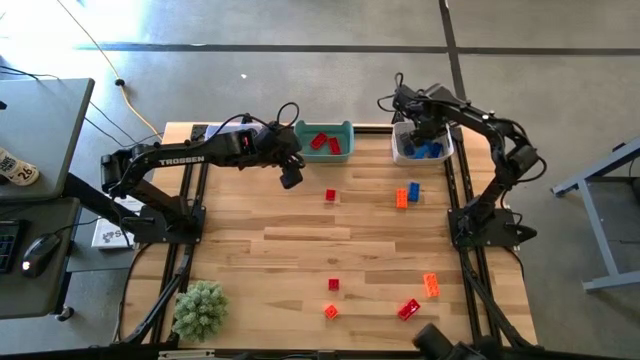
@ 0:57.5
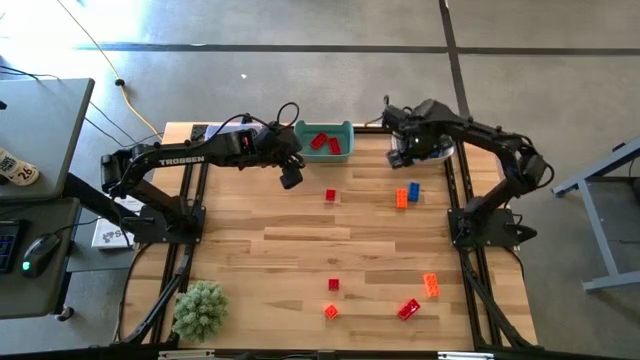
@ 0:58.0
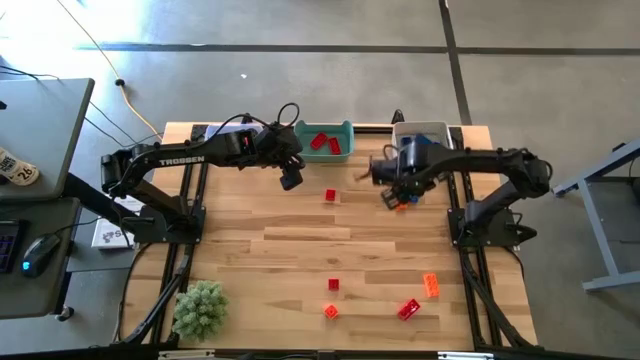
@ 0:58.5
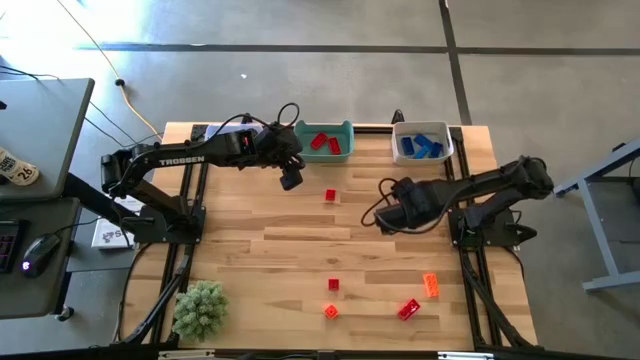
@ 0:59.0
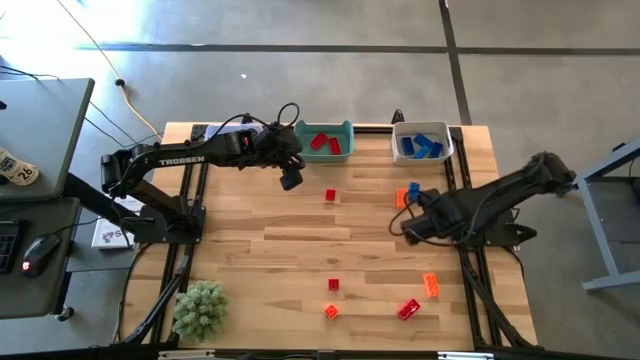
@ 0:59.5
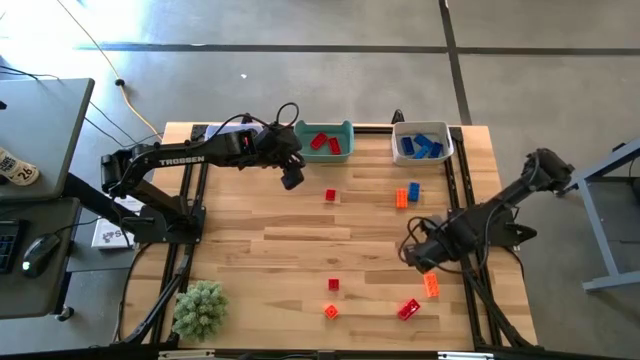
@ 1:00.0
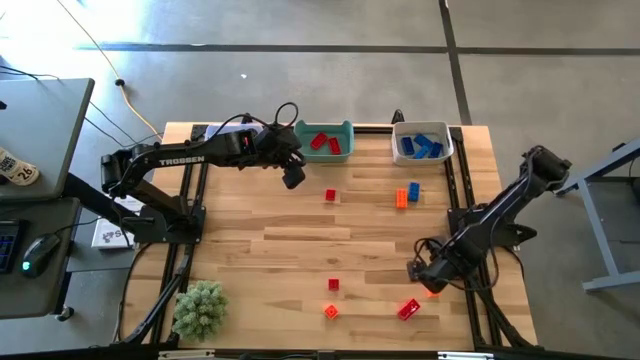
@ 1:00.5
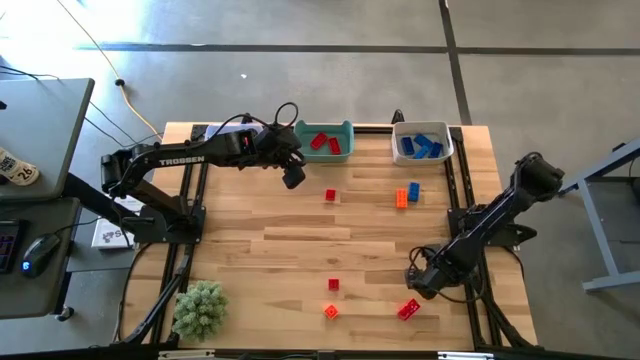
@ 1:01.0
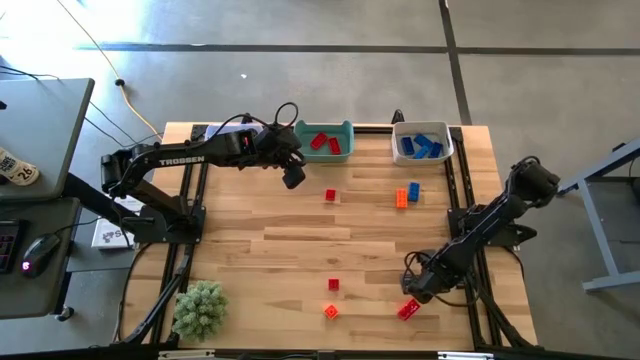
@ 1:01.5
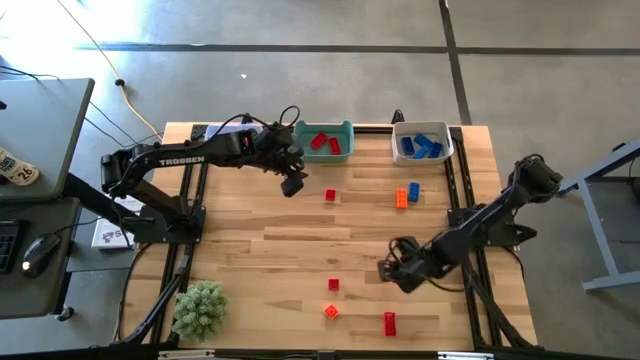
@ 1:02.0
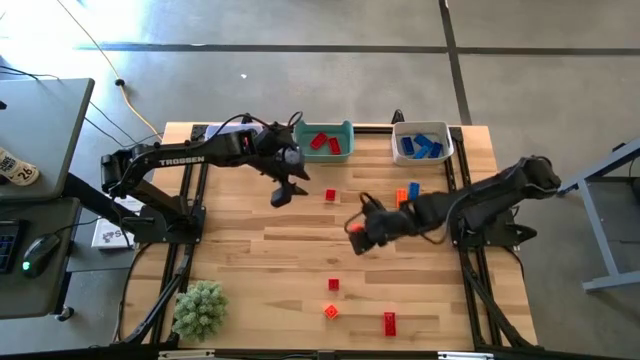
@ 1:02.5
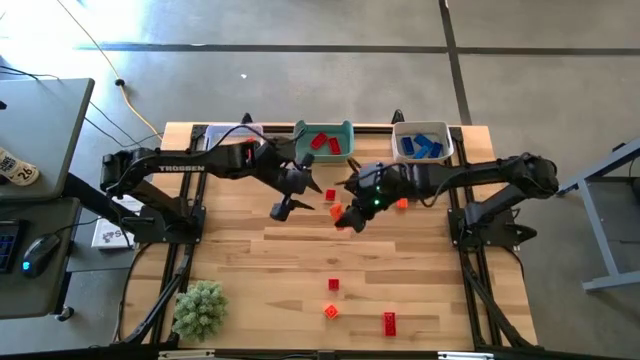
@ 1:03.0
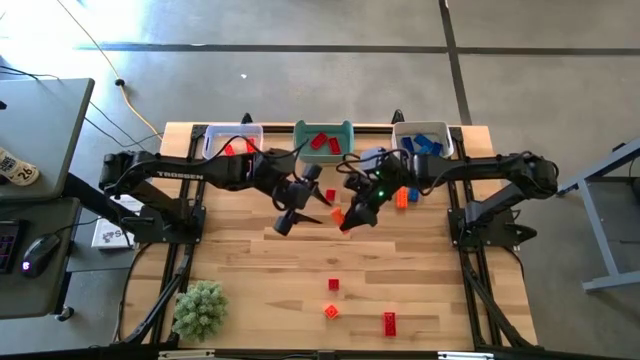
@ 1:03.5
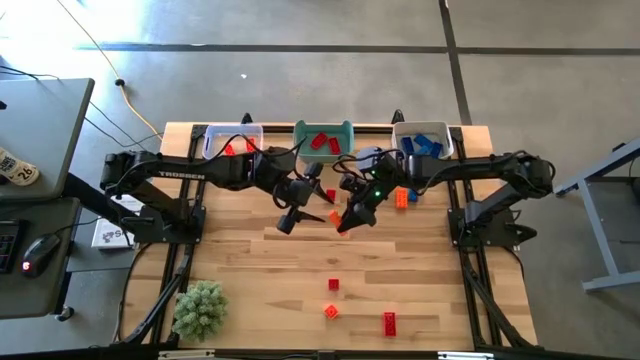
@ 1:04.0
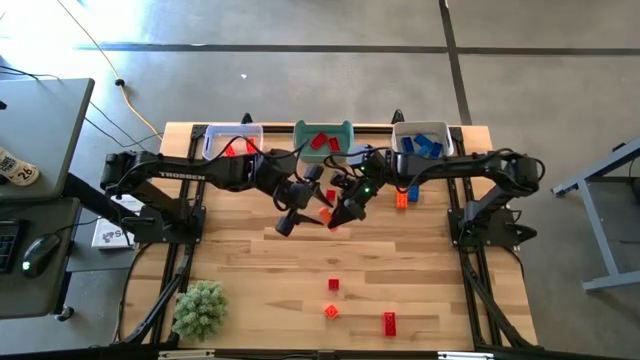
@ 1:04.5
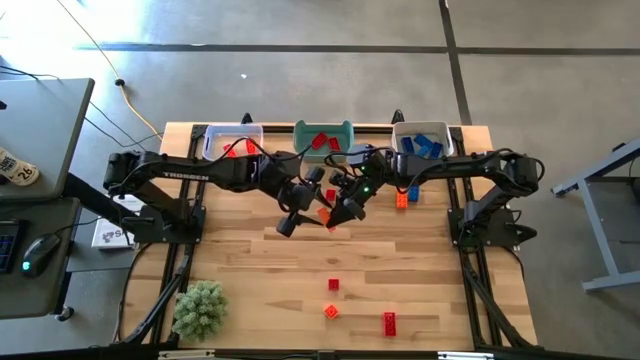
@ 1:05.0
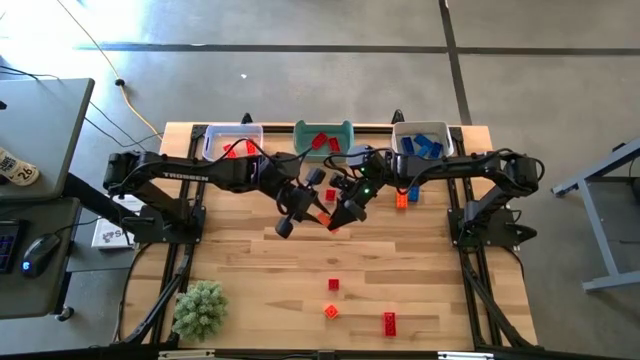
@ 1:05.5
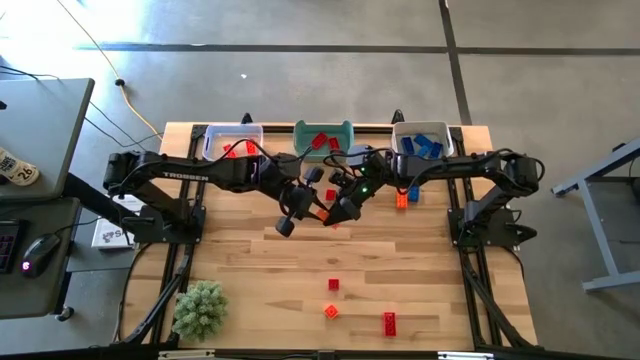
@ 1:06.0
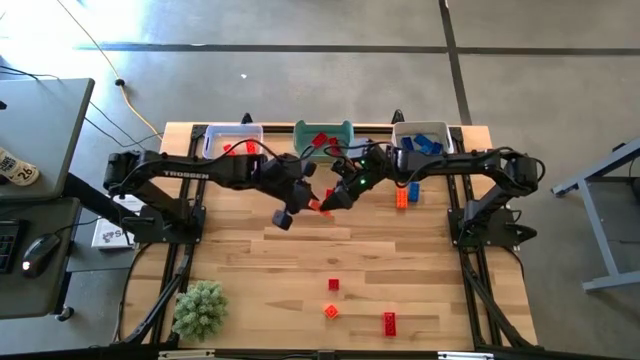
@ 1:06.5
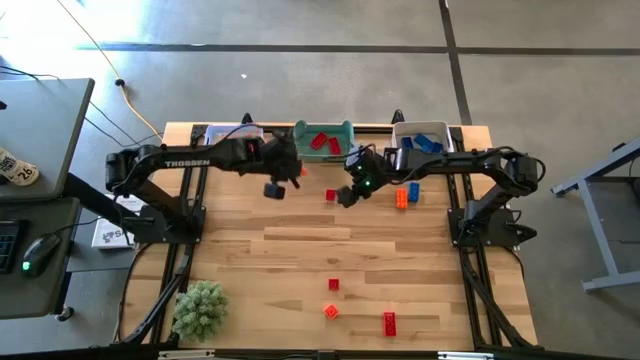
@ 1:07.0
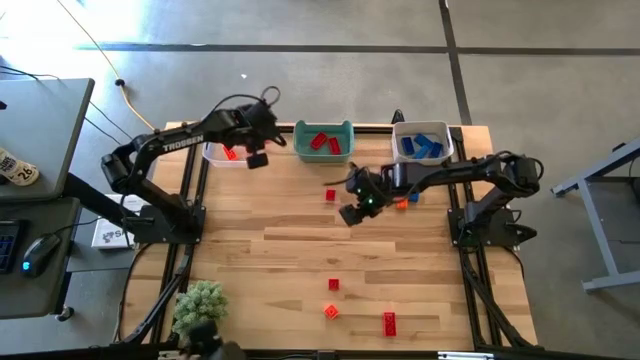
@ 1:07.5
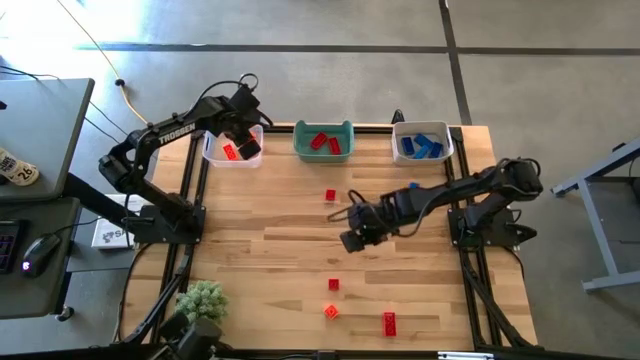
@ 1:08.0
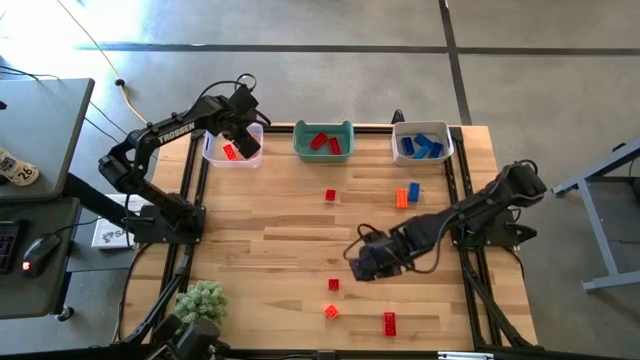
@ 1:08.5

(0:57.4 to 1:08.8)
Task: Sort & place blocks by color
Put the orange game piece into the transparent bin

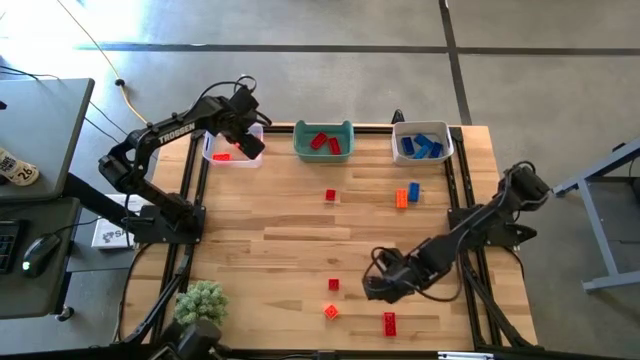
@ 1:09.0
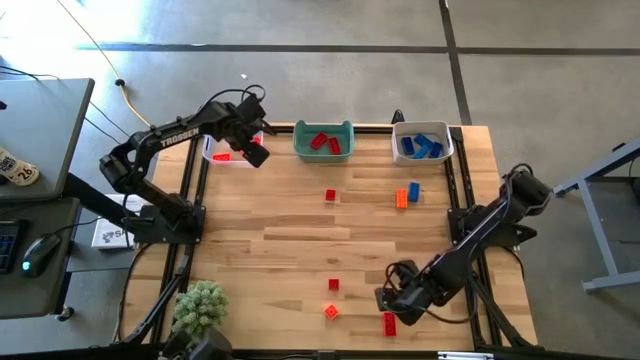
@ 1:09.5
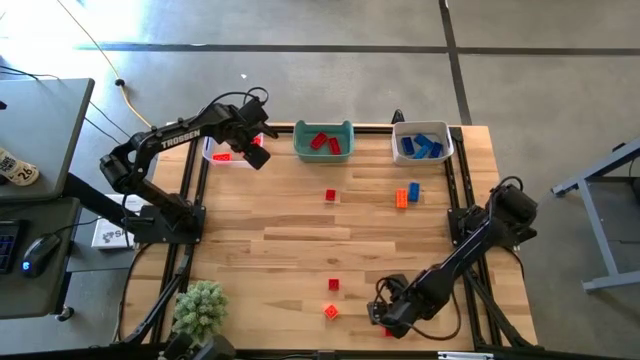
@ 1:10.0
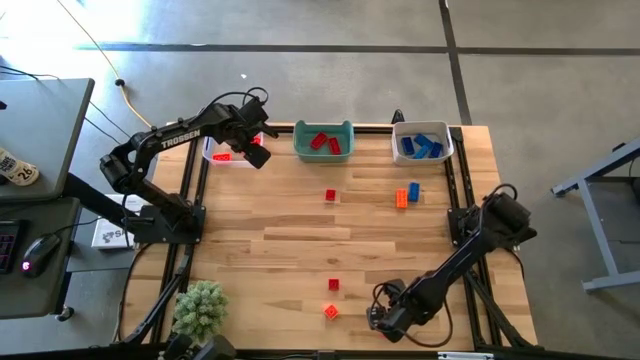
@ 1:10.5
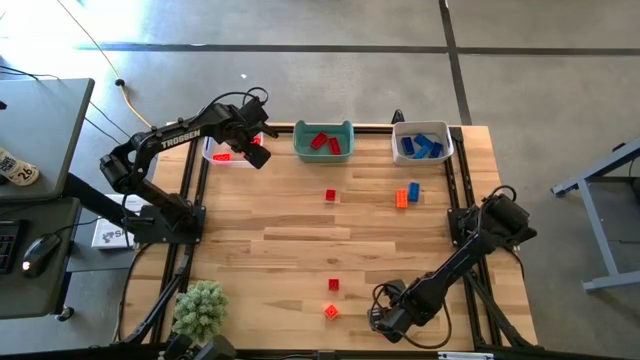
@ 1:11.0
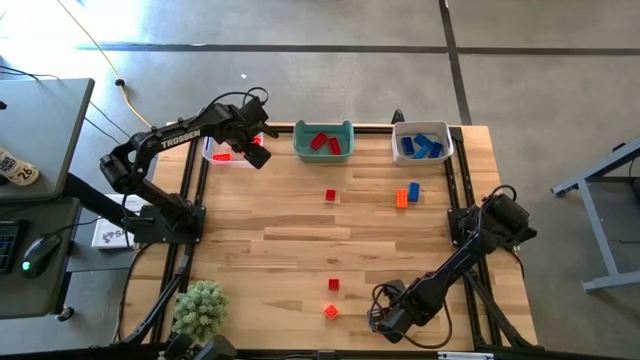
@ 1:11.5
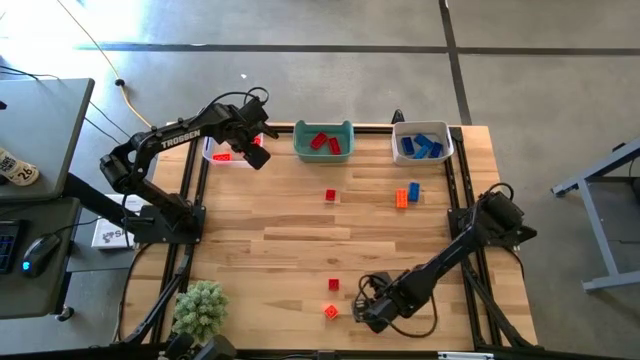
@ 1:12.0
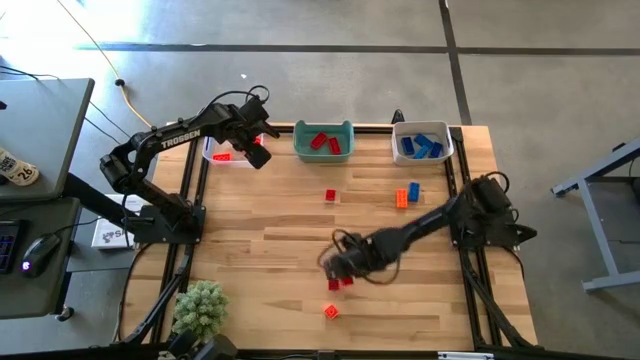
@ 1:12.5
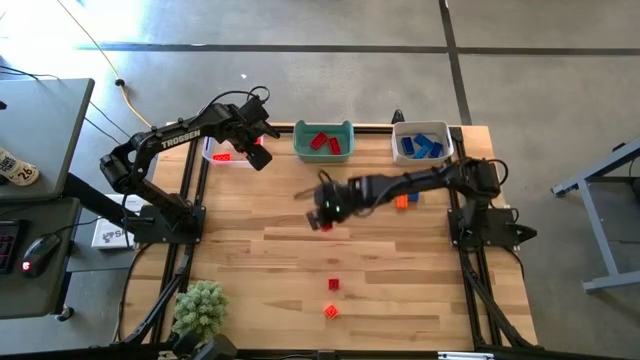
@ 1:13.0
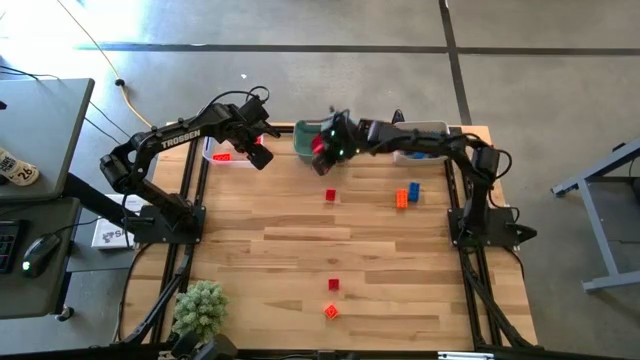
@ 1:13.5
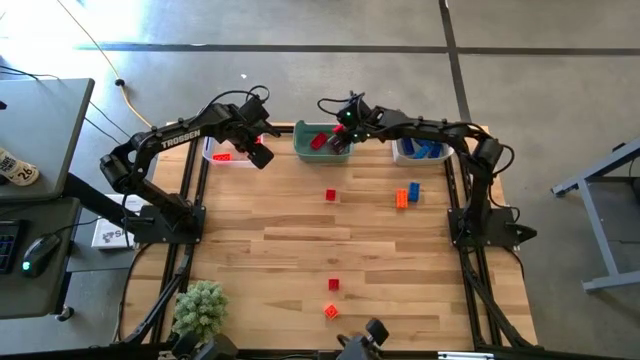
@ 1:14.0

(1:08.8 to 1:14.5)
Put the right red game piece into the green bin

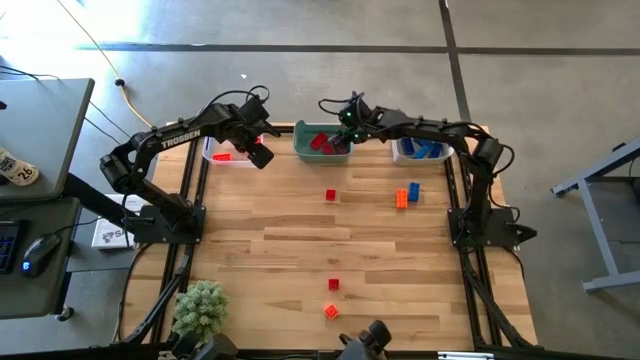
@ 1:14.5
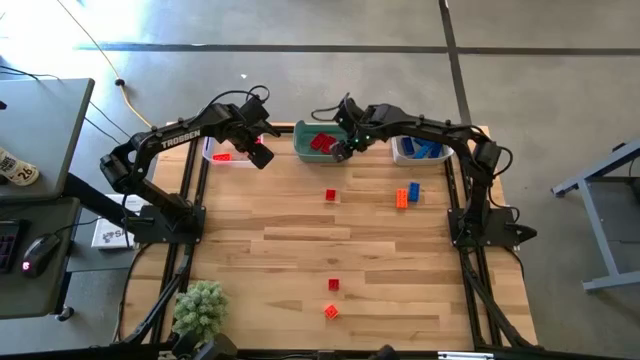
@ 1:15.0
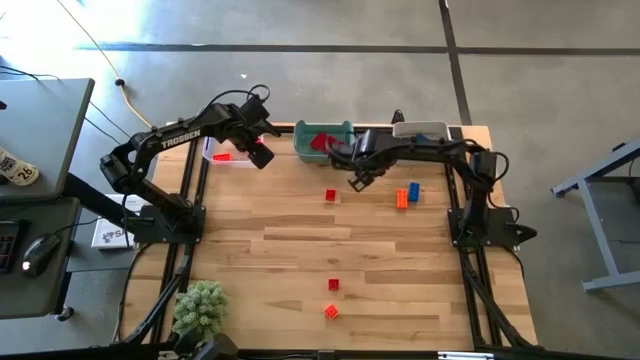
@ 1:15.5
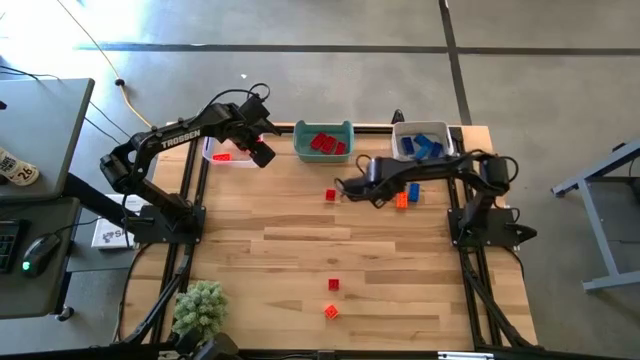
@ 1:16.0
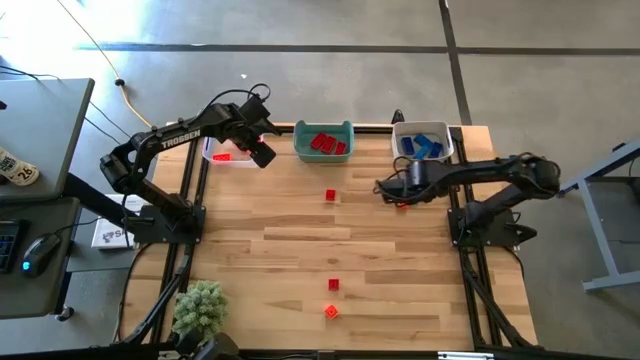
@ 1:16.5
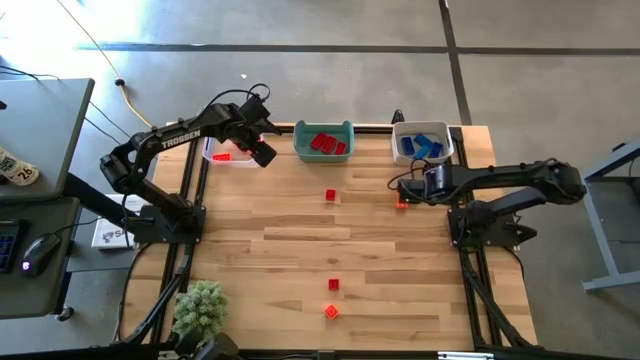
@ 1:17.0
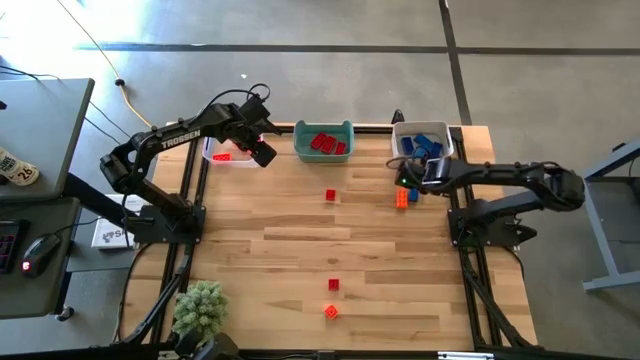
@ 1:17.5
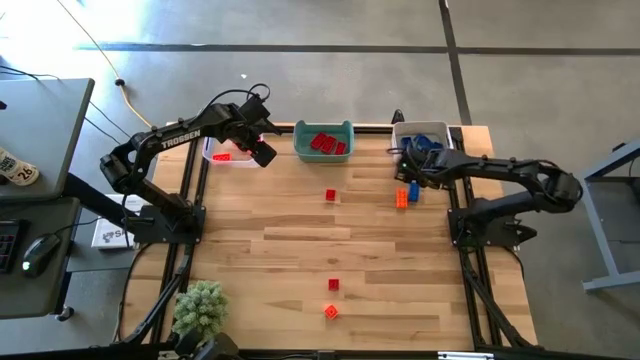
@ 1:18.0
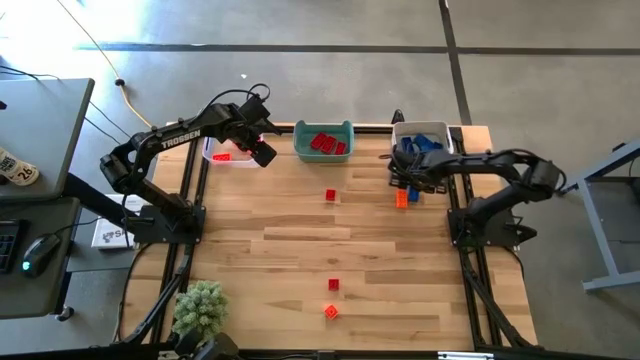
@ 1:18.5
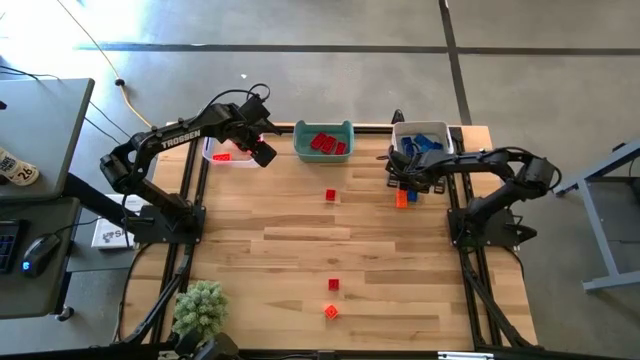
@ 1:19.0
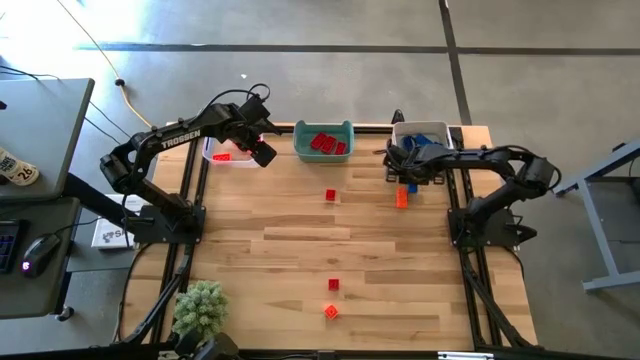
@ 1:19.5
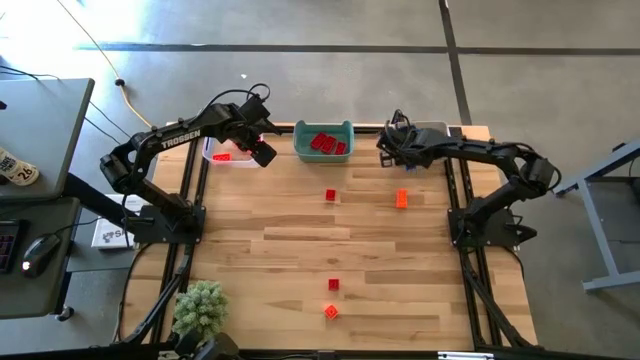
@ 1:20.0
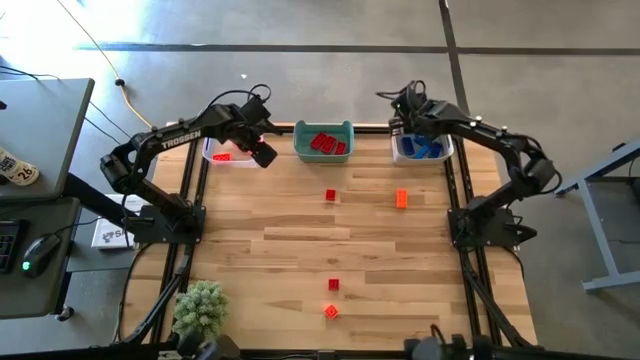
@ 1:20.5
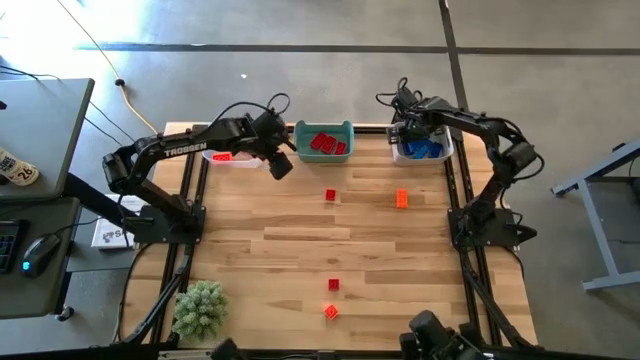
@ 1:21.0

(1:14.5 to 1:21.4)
Put the blue game piece into the white bin
